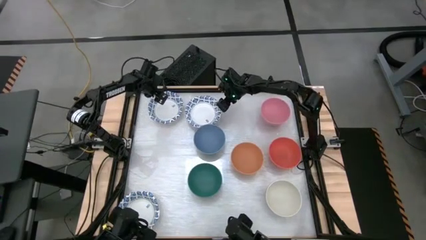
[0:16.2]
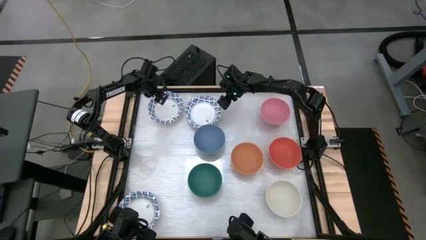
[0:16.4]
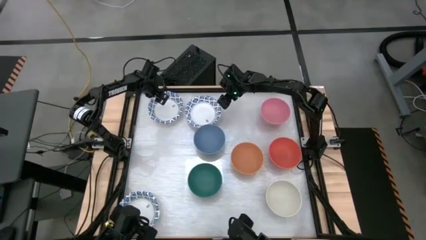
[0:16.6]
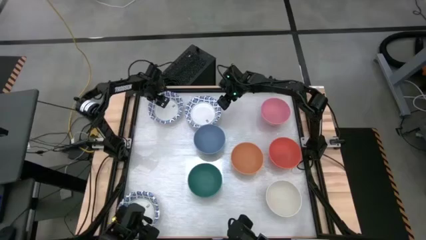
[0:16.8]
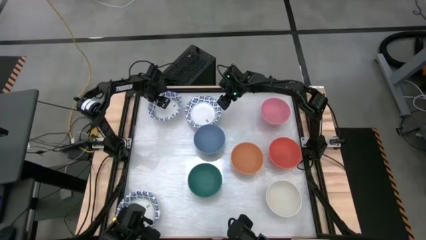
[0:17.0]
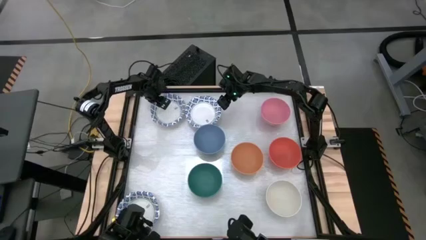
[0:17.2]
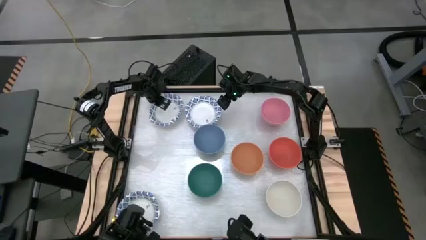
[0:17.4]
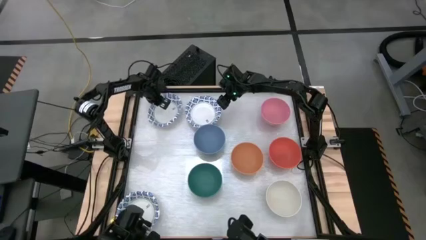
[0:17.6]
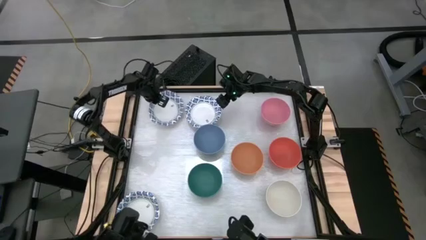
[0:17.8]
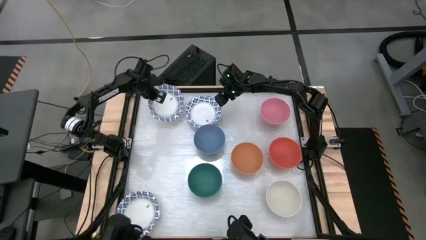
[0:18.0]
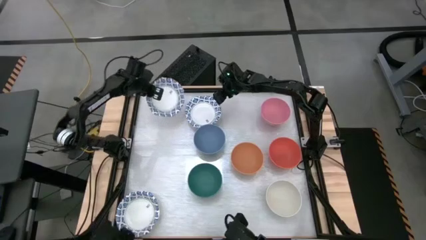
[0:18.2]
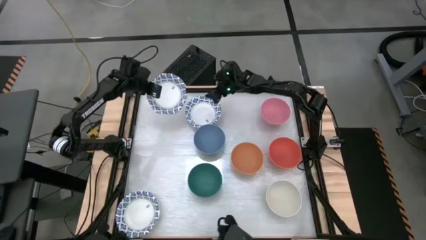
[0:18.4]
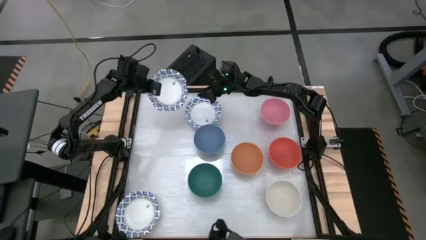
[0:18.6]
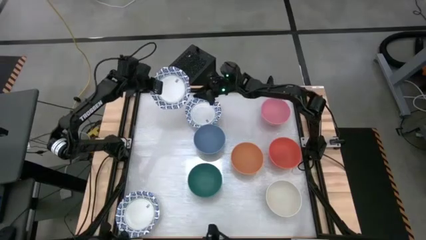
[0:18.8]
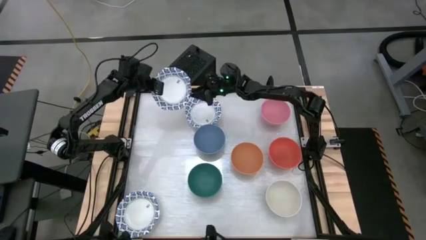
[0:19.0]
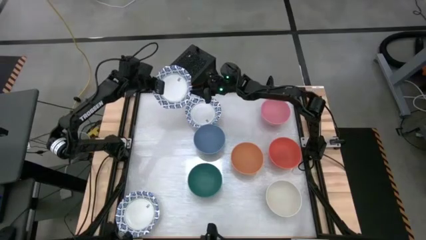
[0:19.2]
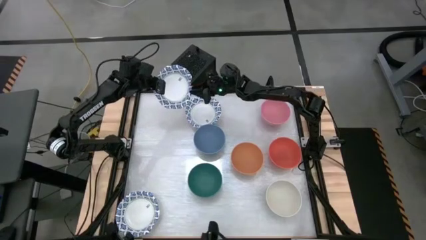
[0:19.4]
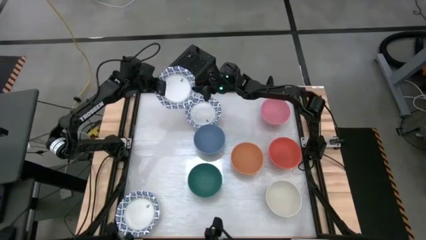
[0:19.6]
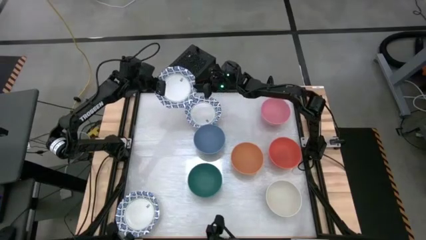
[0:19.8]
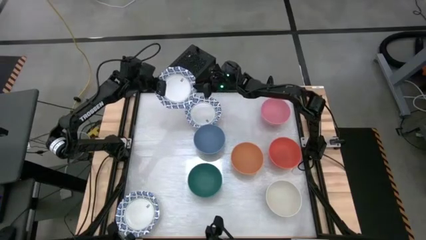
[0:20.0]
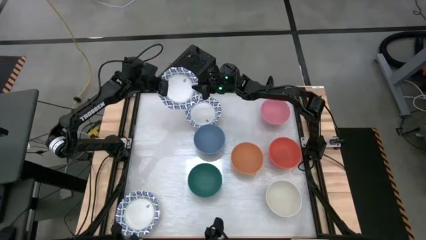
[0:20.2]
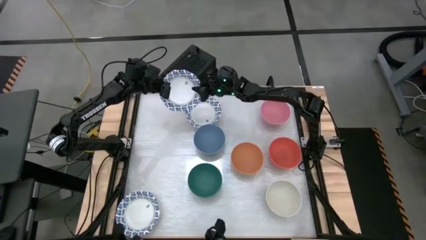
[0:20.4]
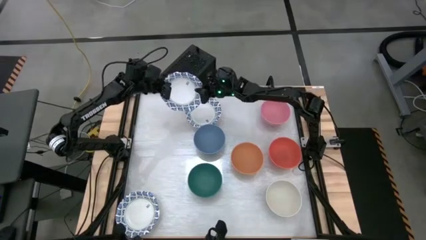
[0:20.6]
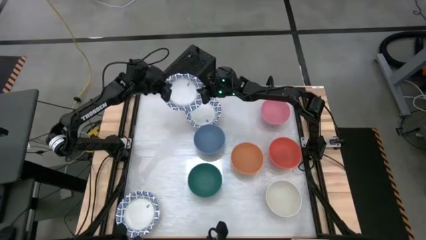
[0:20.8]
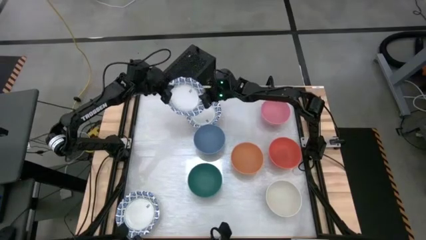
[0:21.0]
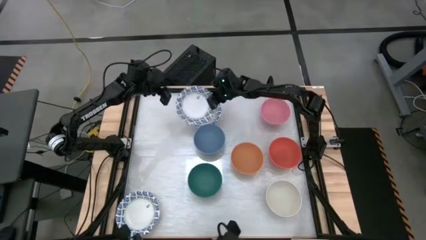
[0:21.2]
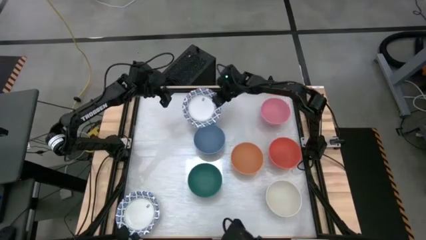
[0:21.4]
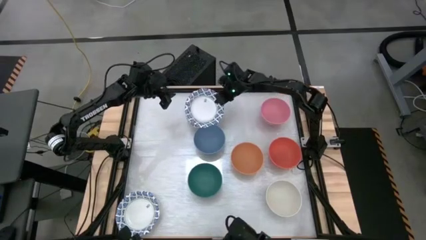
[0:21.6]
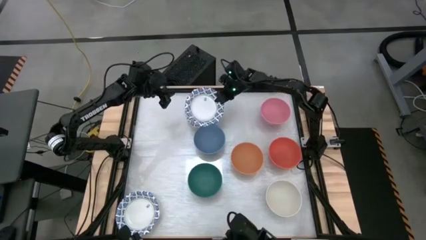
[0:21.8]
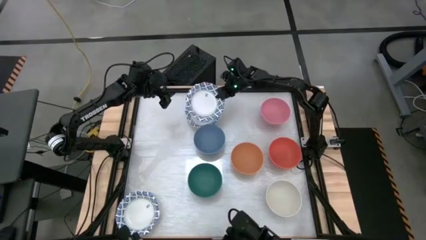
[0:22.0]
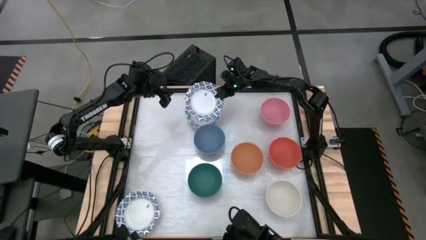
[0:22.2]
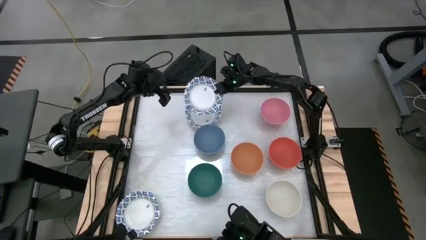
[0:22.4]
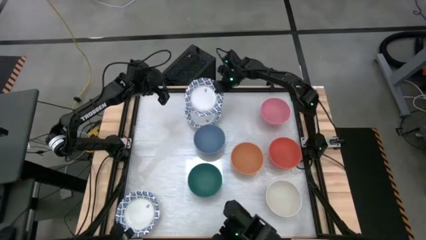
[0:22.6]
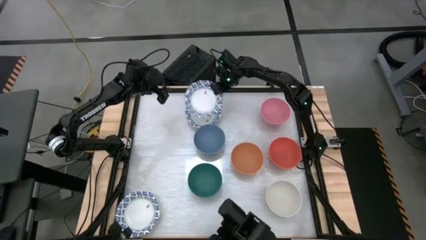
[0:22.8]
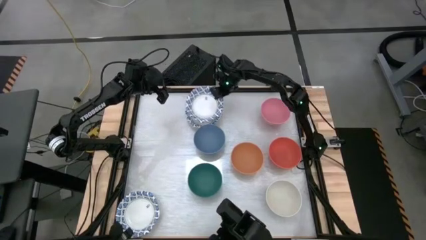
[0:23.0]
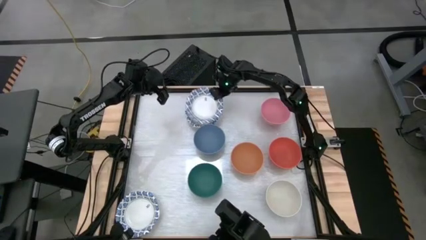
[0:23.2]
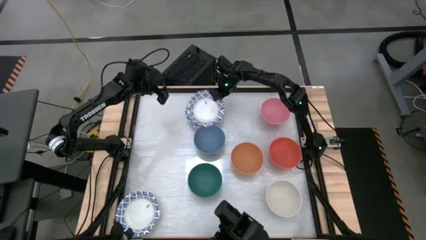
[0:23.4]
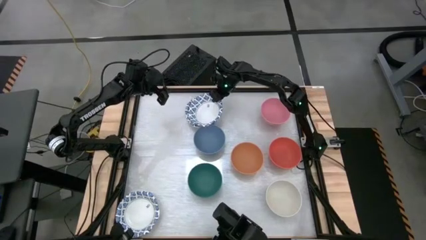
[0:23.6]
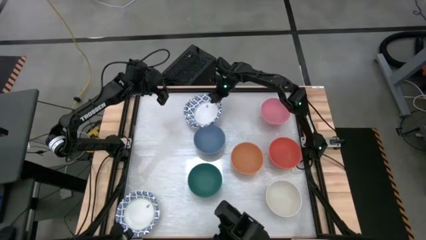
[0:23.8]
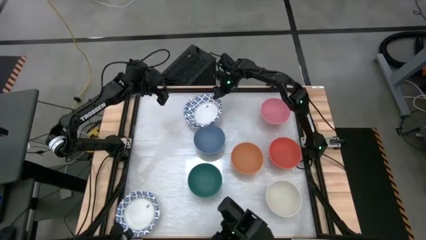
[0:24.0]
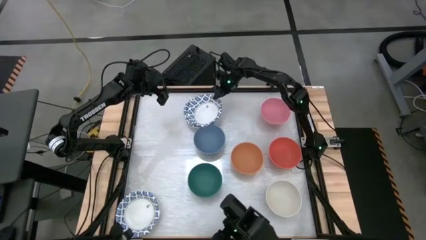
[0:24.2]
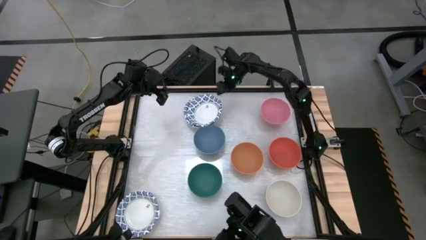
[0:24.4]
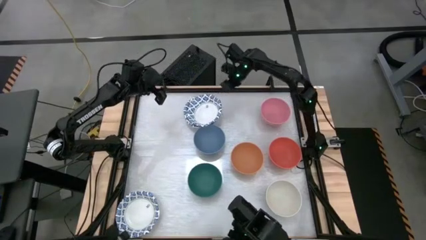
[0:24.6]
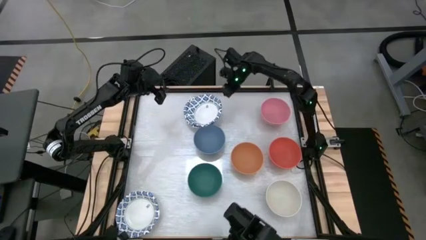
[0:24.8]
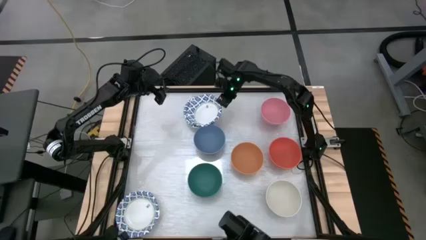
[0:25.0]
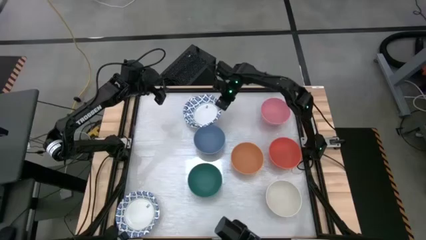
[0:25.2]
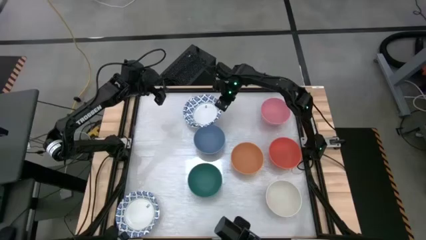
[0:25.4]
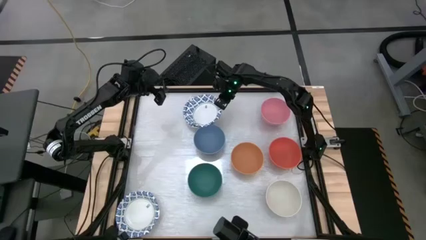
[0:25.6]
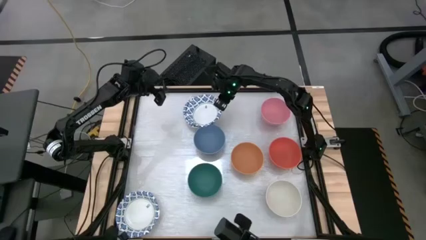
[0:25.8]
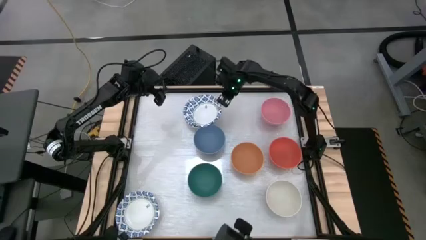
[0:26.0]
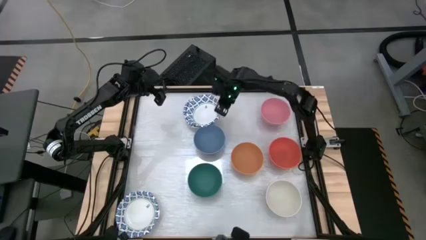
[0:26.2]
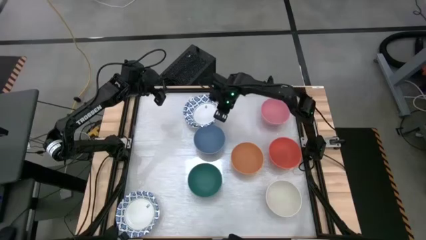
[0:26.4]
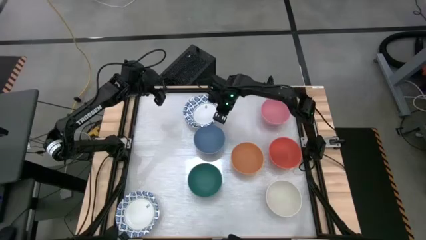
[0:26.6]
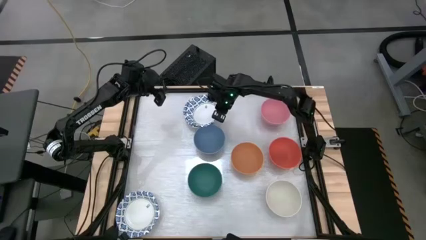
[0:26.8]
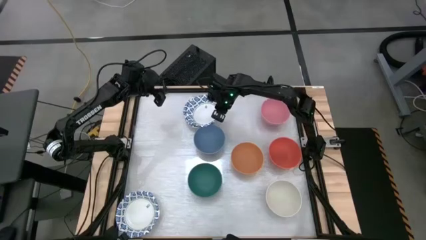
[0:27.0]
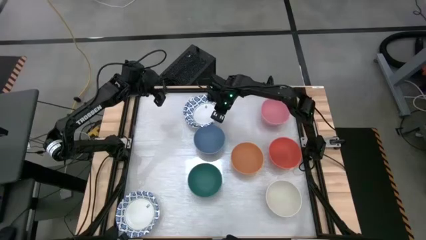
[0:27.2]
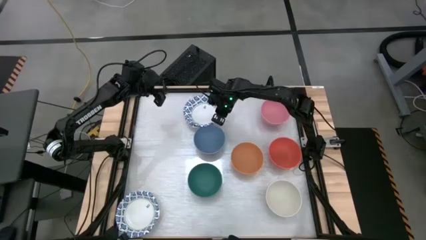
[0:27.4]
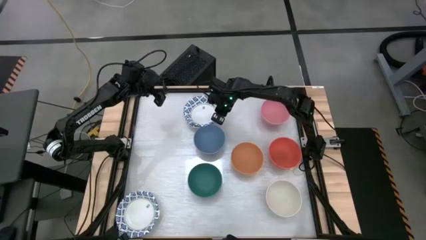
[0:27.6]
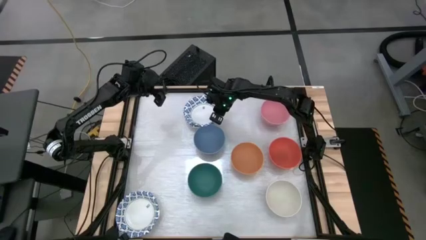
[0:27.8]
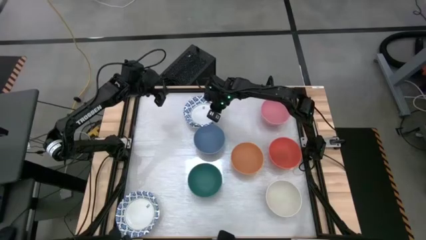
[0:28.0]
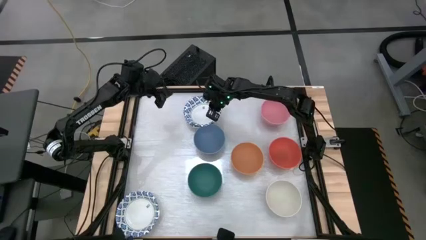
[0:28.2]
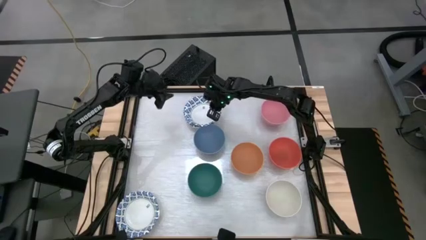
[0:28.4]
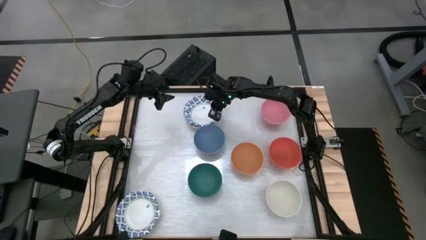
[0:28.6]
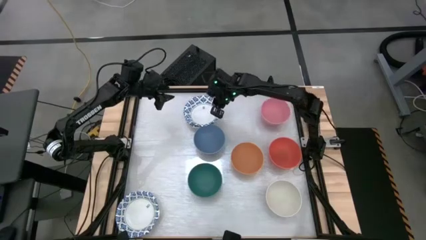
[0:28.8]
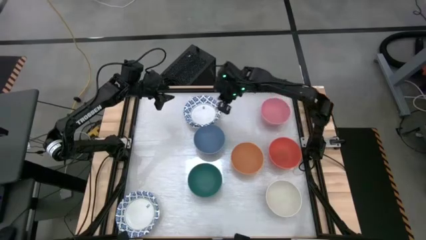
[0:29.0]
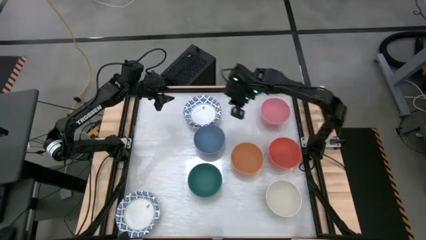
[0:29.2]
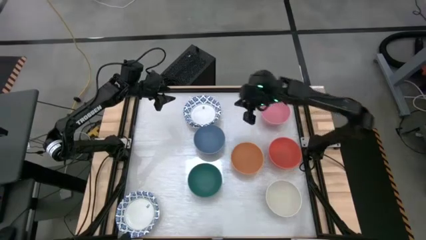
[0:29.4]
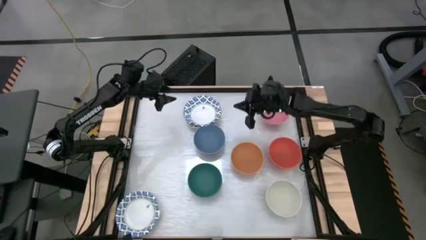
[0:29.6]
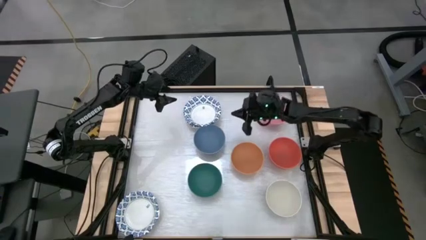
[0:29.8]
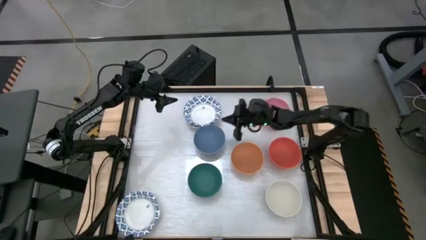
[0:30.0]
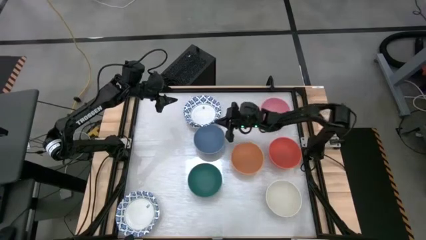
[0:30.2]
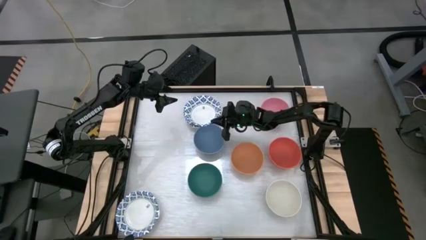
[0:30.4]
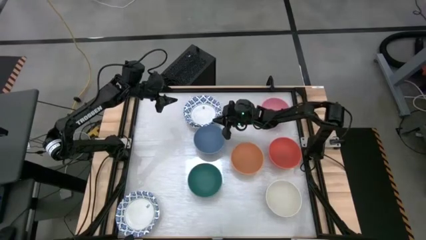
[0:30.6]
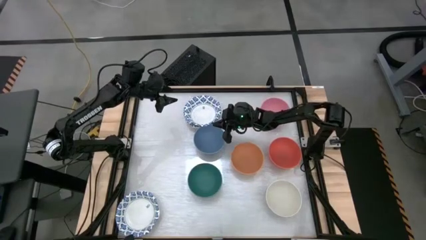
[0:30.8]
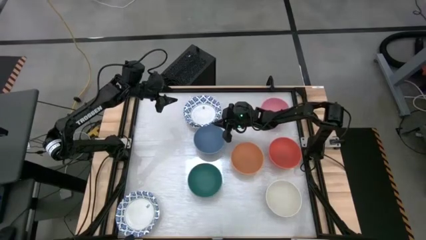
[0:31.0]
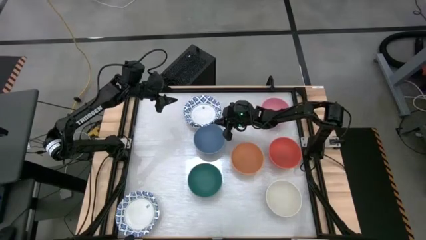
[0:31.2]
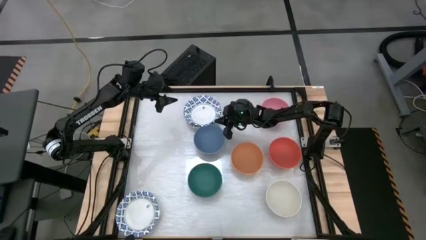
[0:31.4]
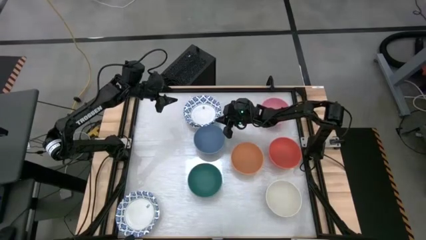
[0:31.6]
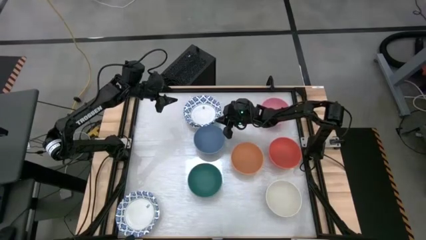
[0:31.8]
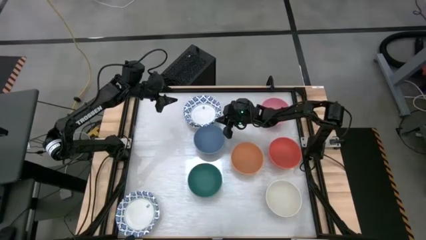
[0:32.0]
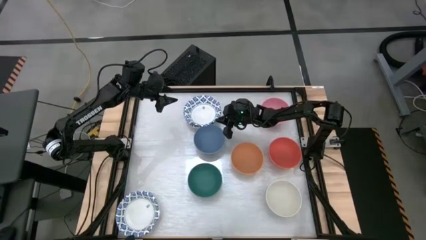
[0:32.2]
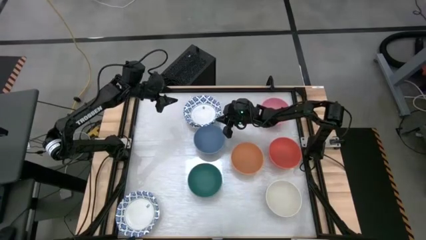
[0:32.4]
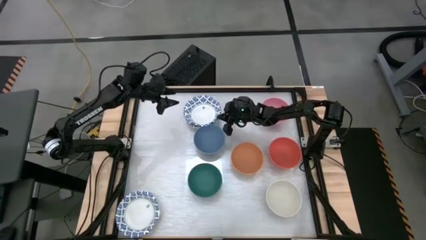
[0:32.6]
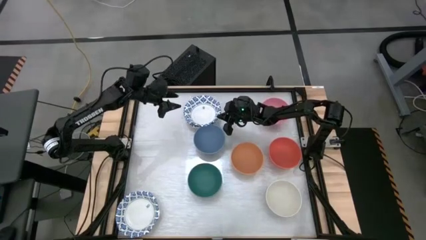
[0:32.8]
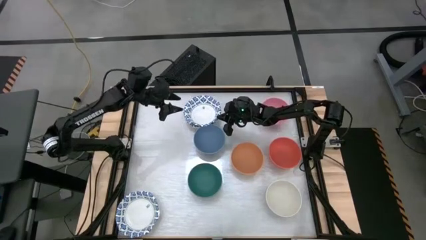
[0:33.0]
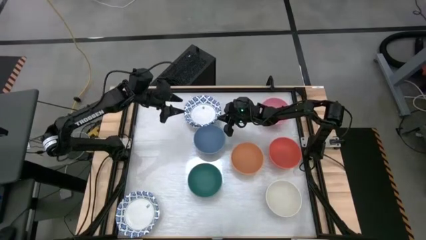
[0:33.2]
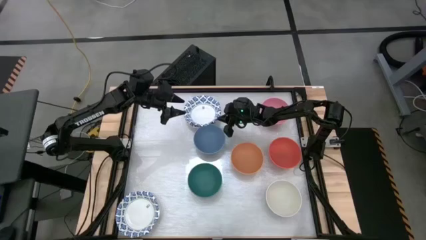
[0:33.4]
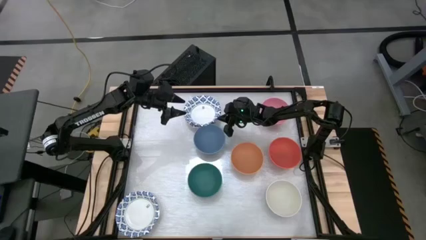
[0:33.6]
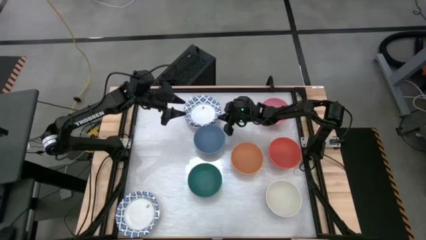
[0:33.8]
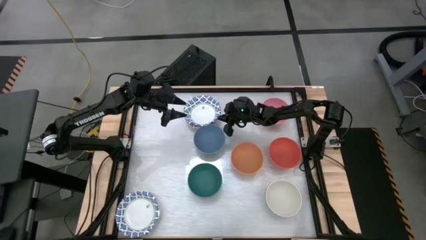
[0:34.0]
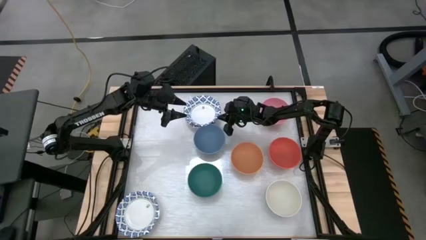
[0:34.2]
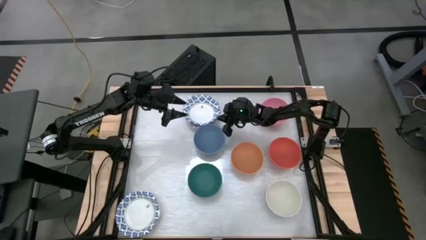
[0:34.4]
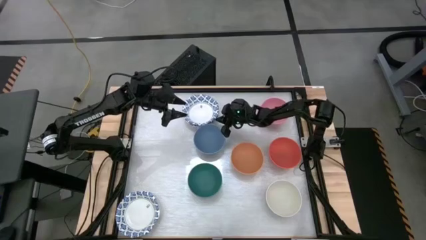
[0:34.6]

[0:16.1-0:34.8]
Stack the white bowl on top of the other white bowl
